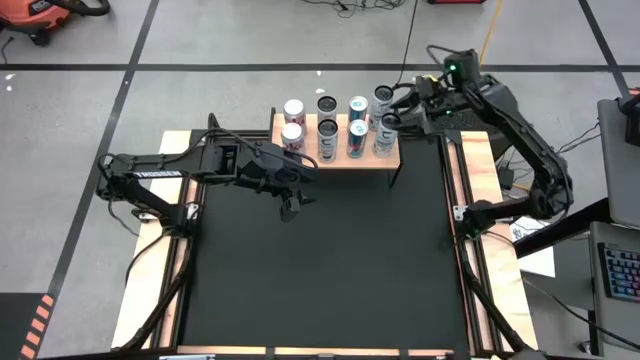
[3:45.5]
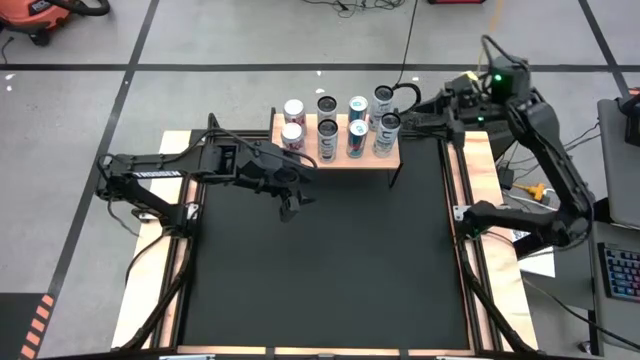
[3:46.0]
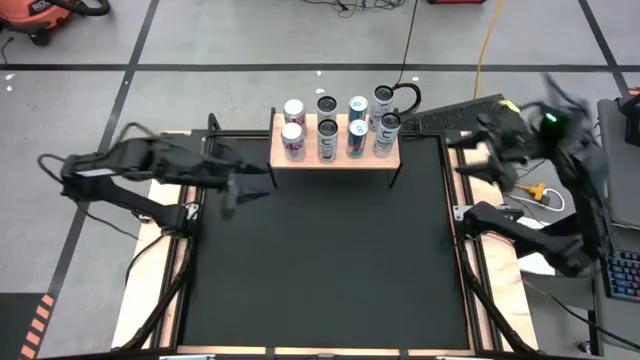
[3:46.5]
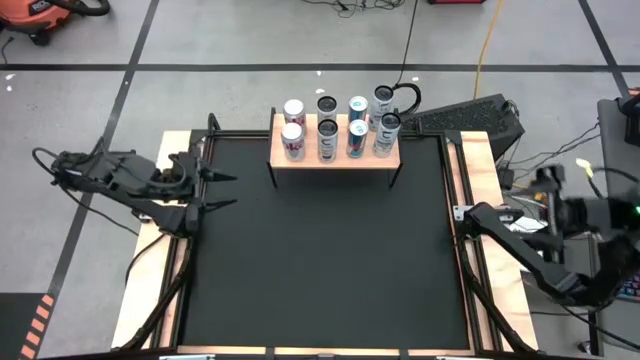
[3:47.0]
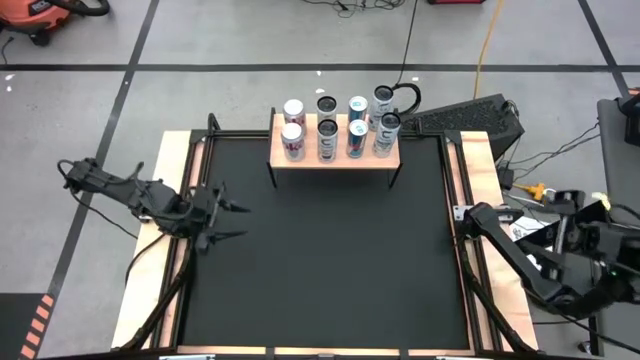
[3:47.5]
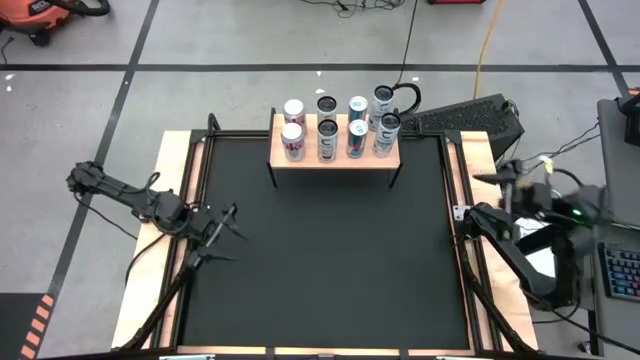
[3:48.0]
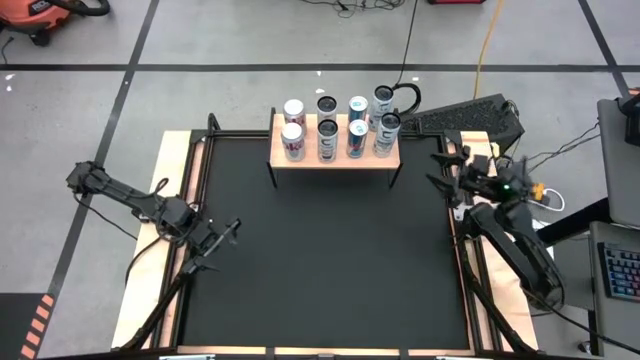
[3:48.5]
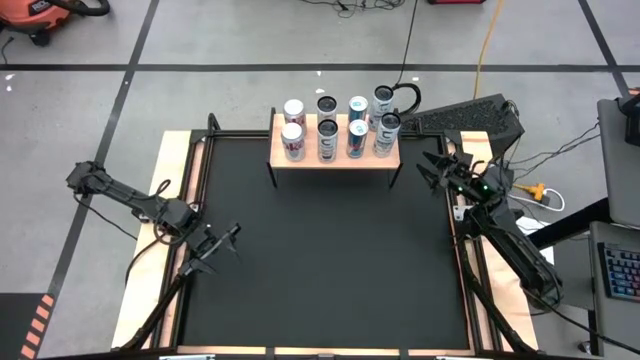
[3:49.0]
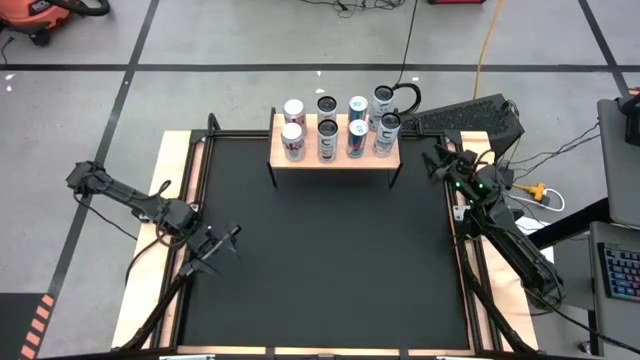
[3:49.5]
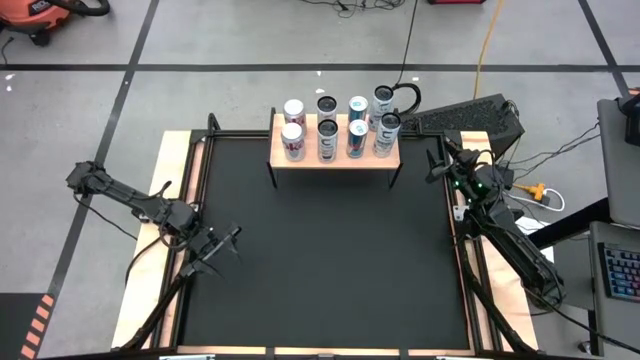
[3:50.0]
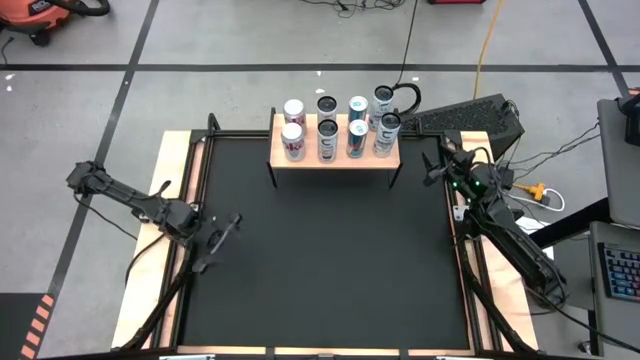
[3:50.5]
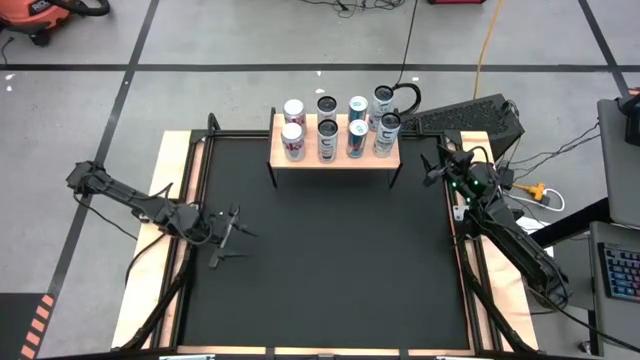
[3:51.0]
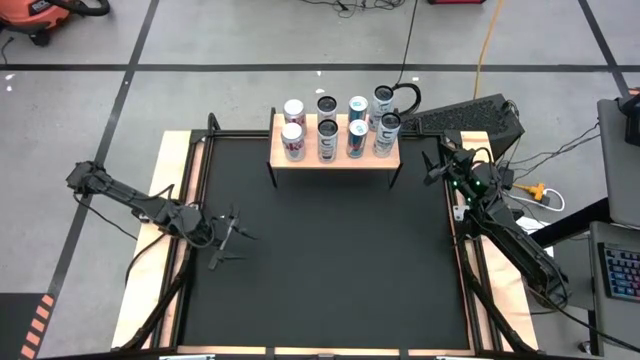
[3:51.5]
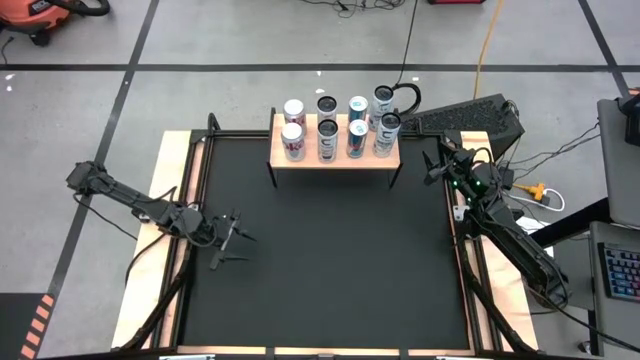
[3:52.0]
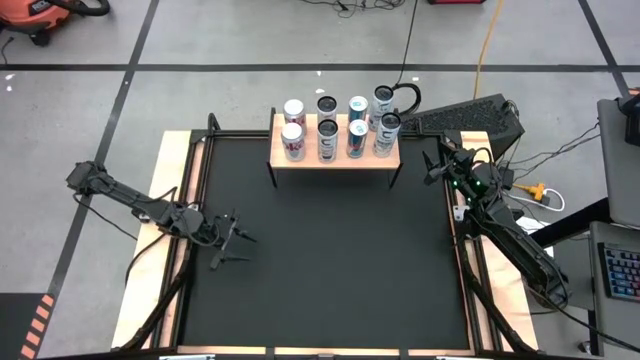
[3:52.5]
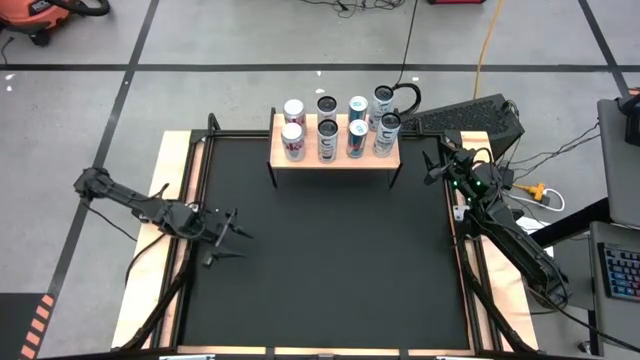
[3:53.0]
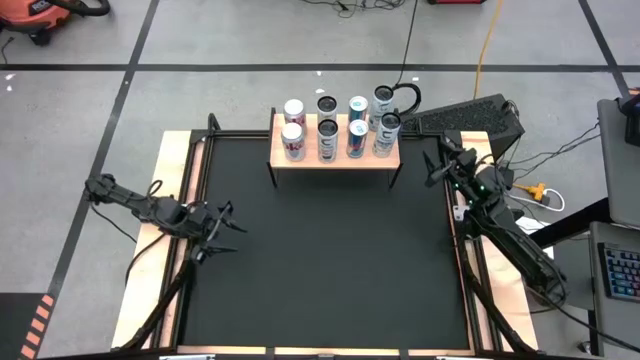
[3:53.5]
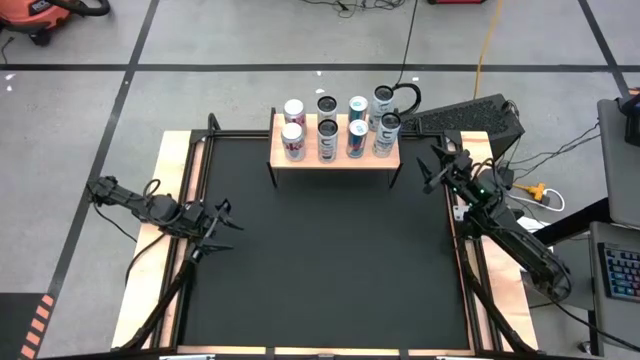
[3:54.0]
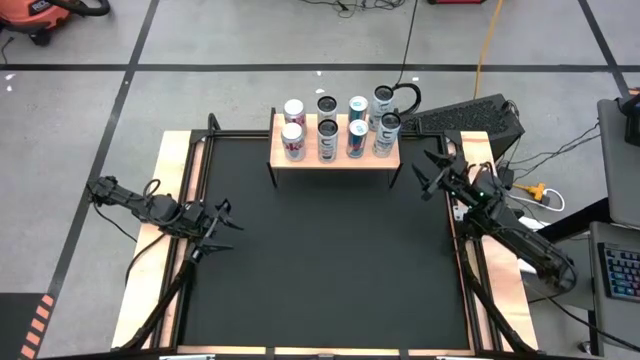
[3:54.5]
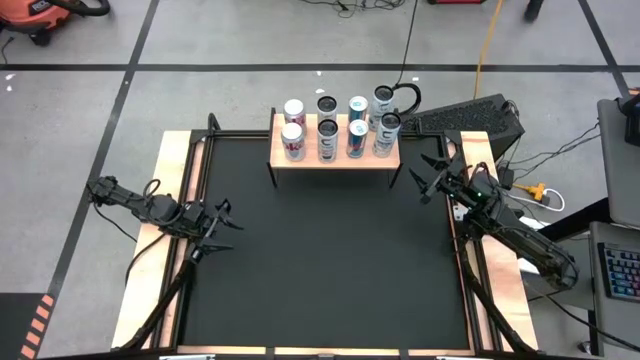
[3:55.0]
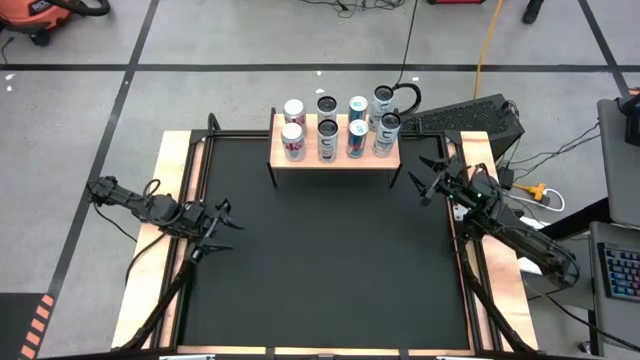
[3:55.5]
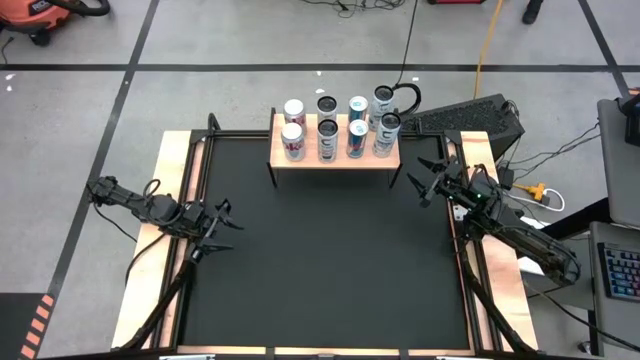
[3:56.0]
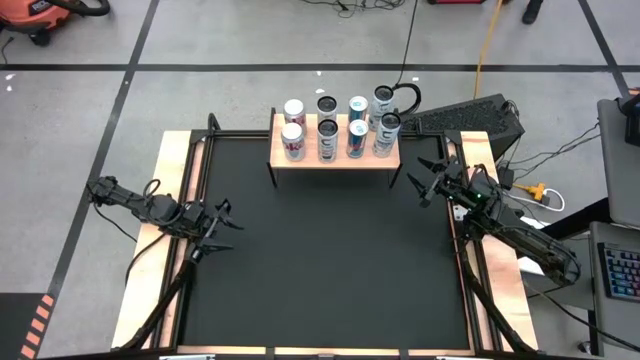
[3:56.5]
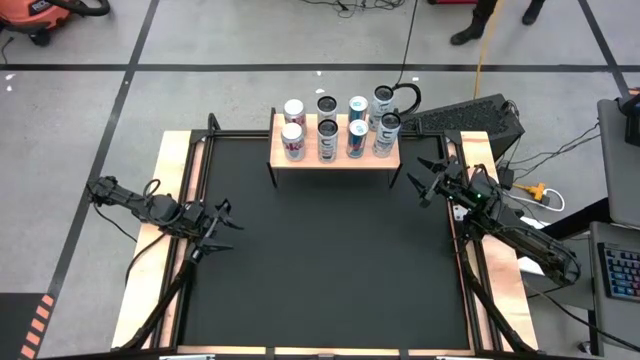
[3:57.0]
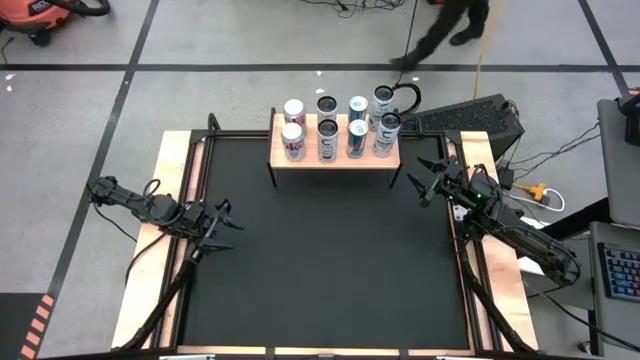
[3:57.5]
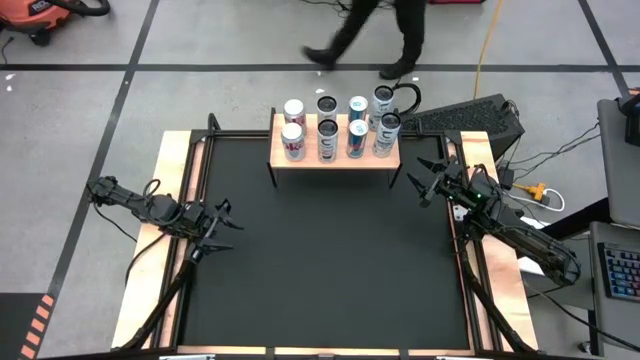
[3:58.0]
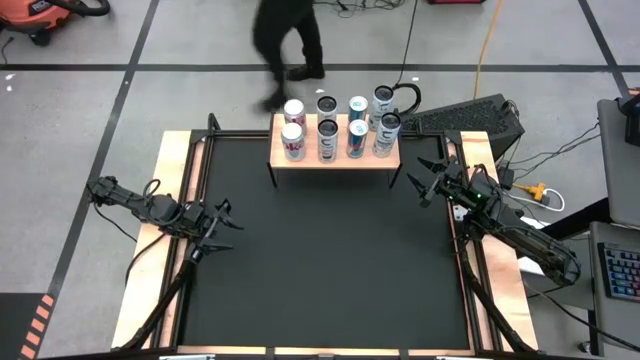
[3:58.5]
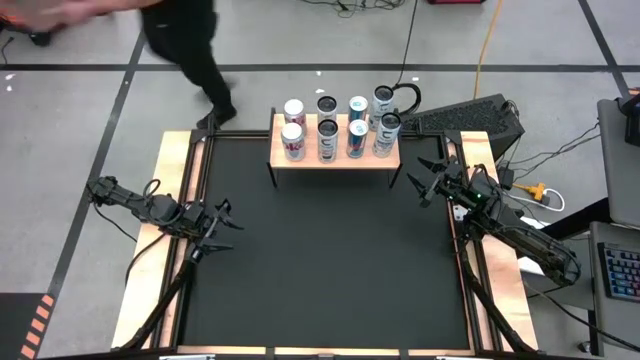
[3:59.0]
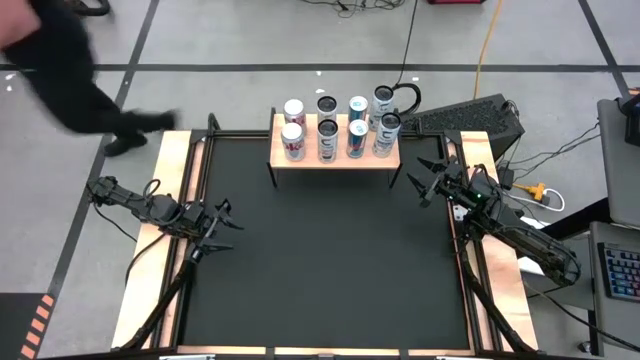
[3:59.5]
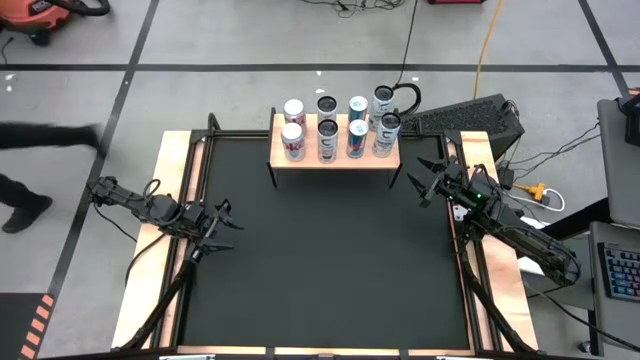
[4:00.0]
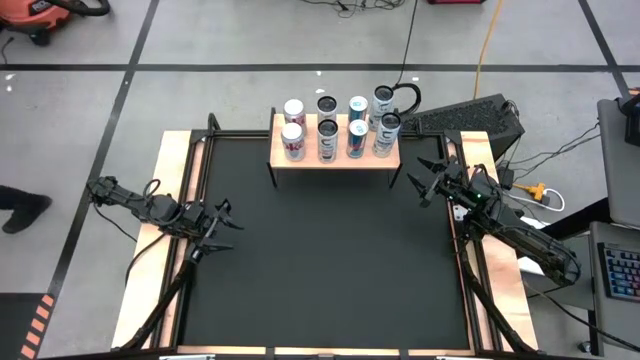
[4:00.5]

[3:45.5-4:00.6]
Task: Place canned beverage on shelf
Return to Home Position
